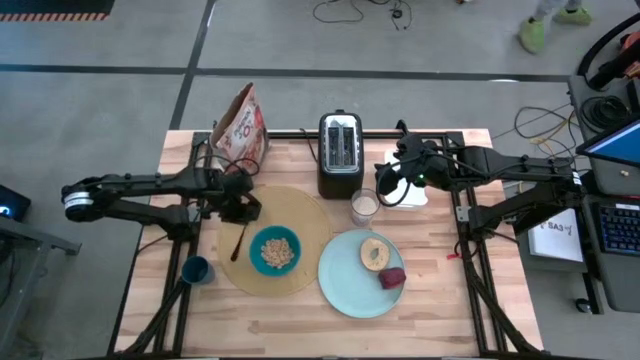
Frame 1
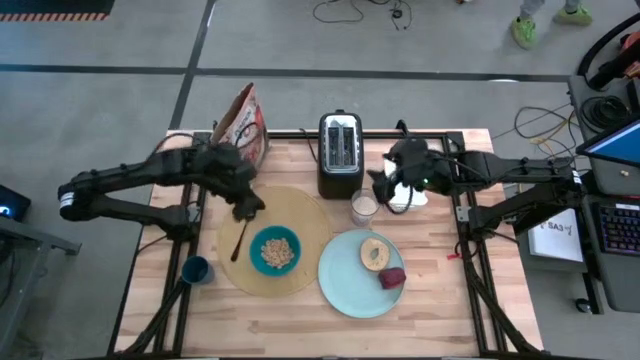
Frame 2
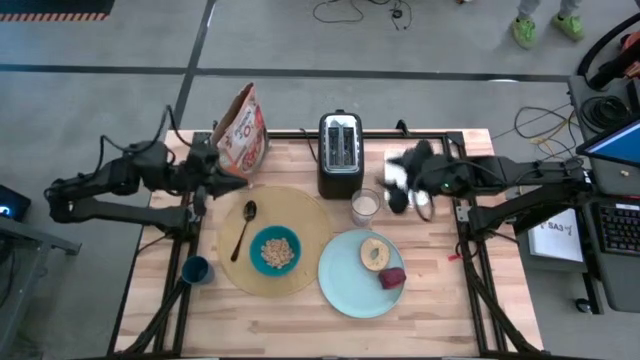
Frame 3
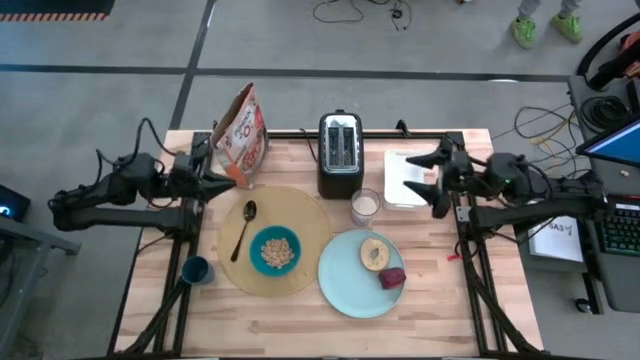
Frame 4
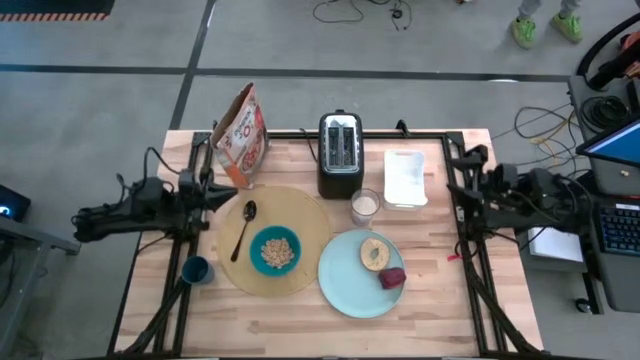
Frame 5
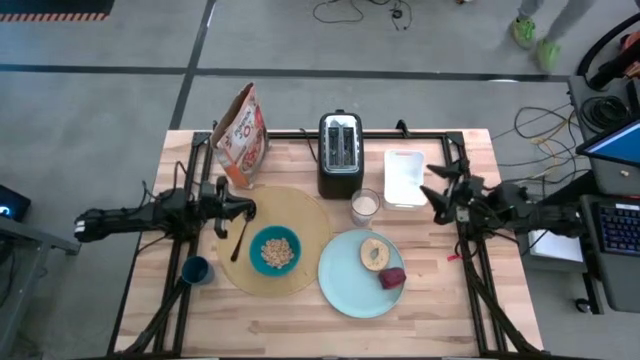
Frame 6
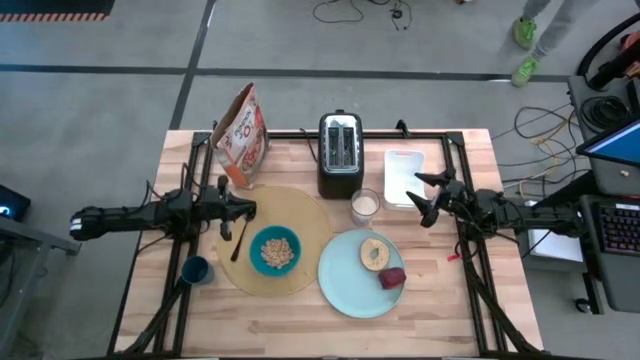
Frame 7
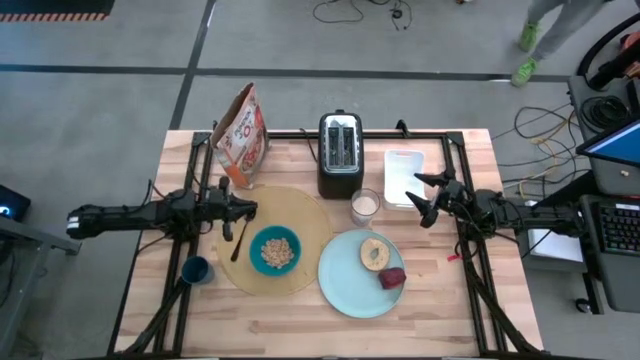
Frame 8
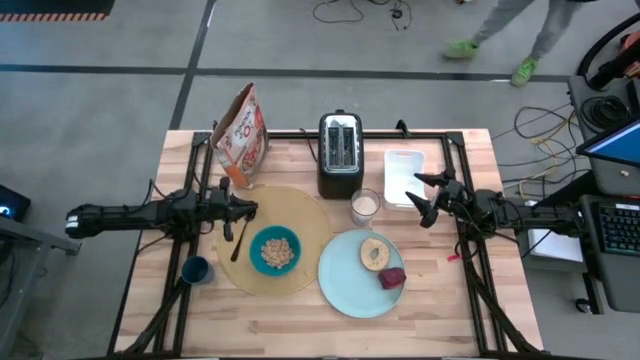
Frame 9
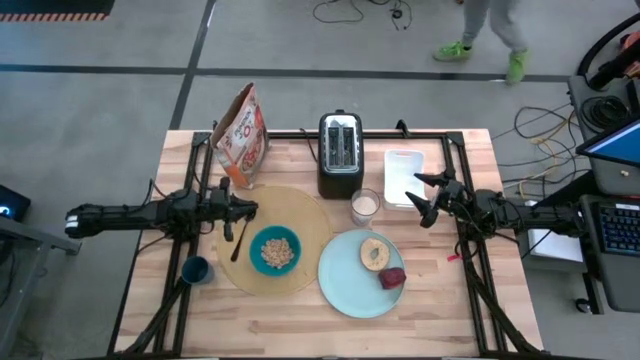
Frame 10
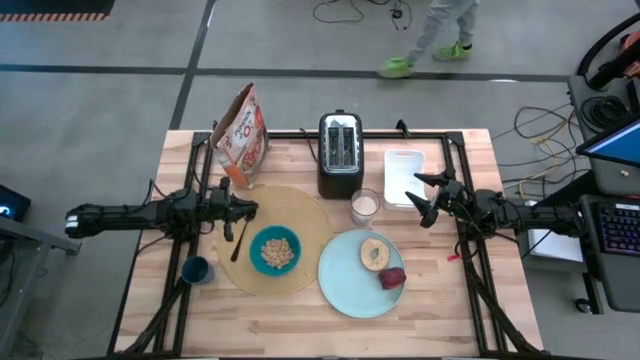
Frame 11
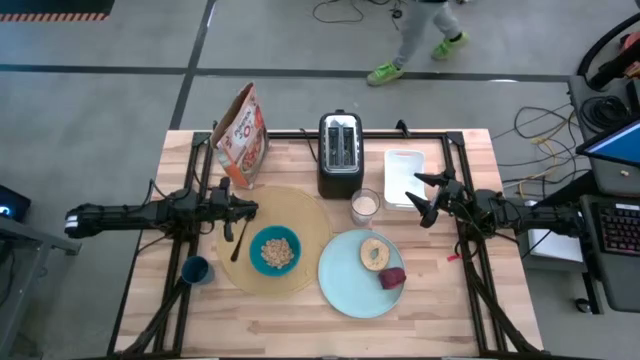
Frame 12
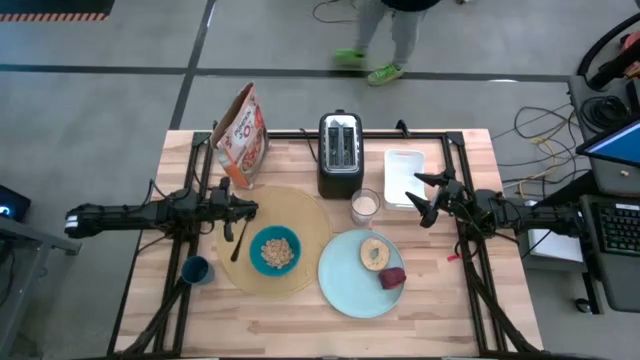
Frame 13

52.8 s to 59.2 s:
Task: Arrange a breakfast setting
Return to Home Position

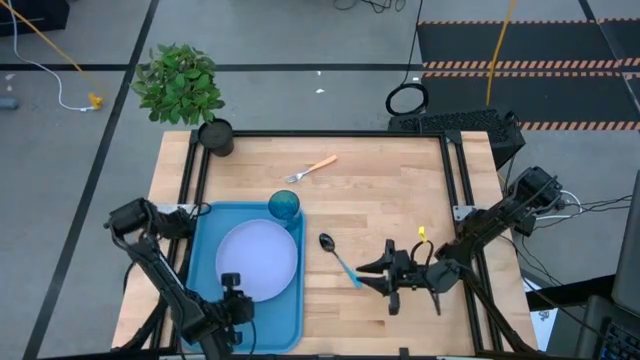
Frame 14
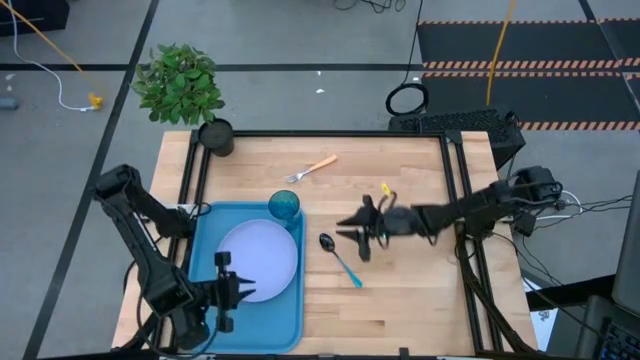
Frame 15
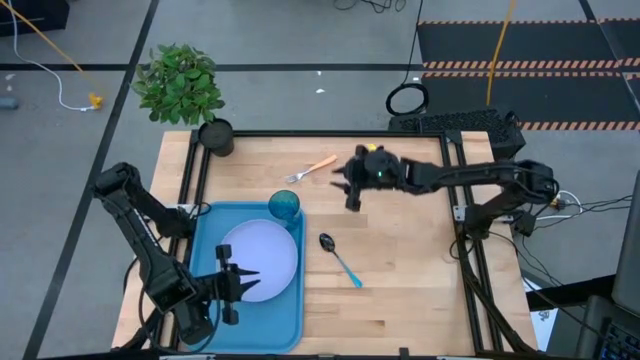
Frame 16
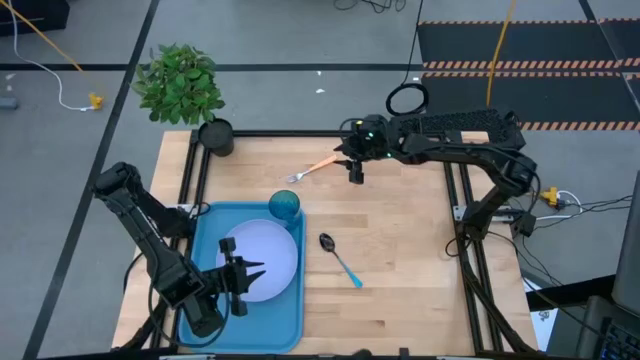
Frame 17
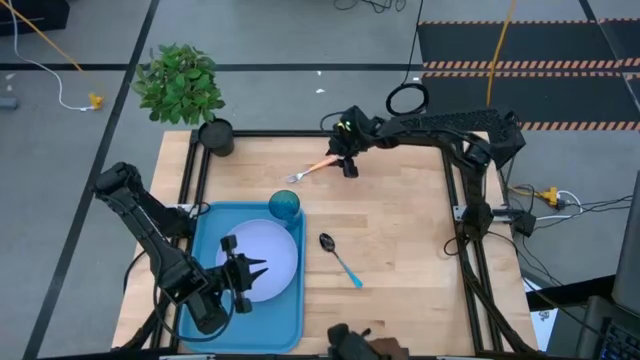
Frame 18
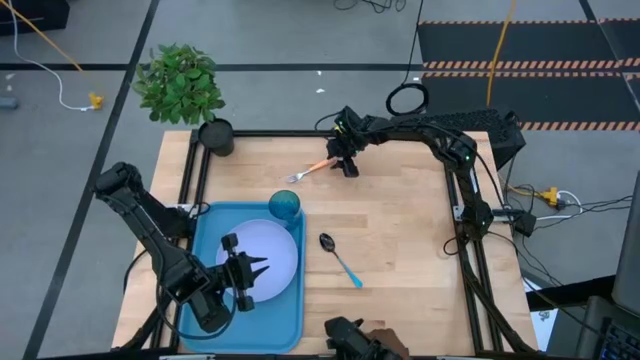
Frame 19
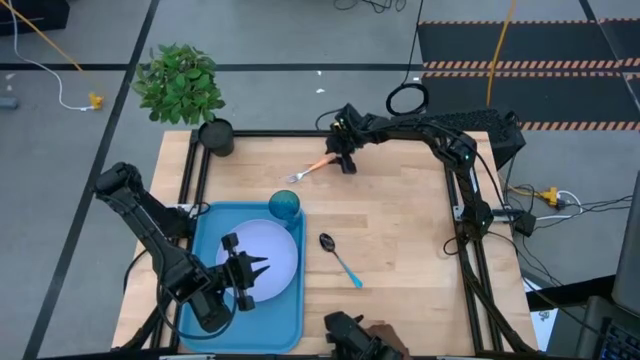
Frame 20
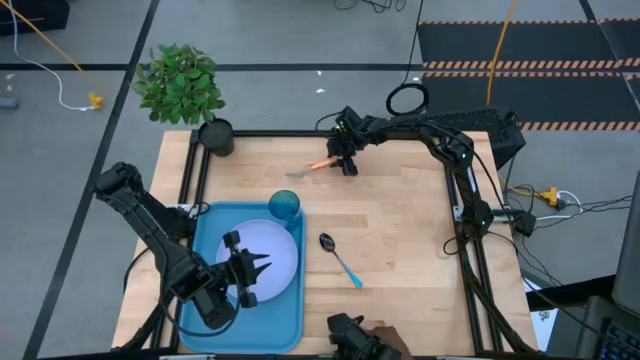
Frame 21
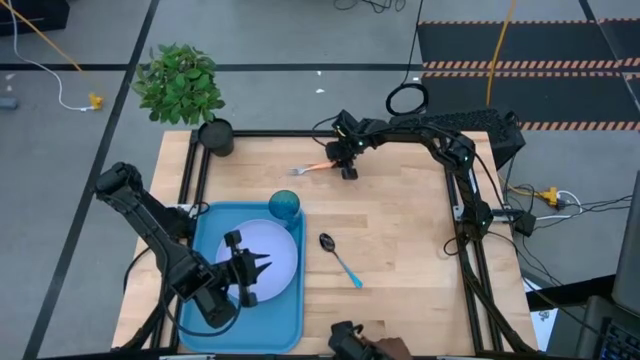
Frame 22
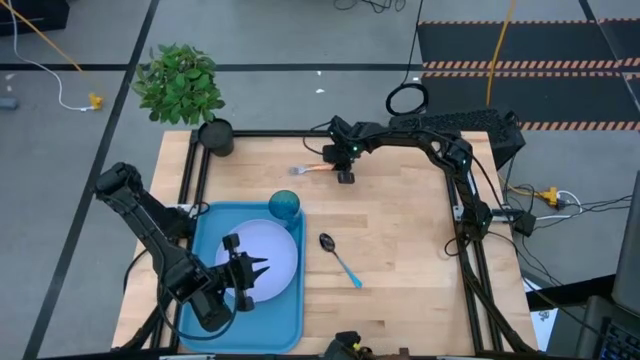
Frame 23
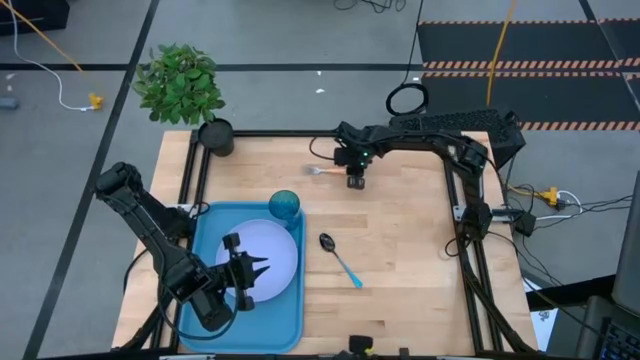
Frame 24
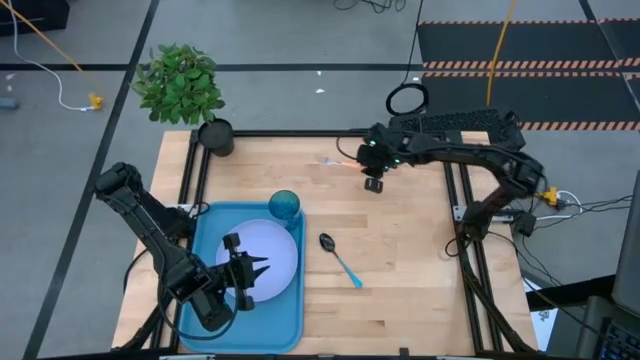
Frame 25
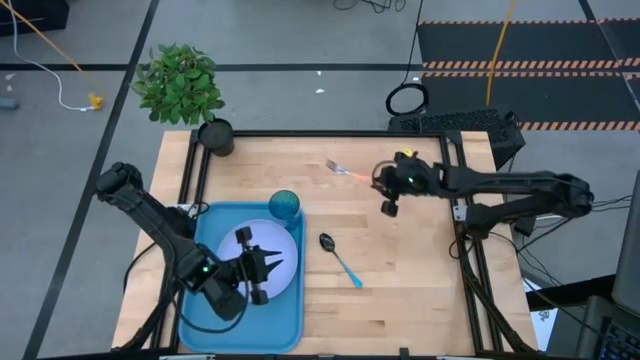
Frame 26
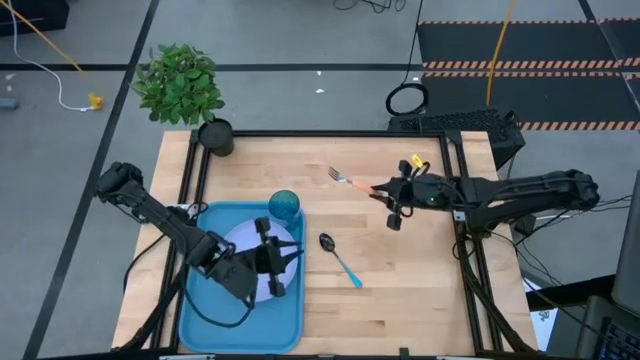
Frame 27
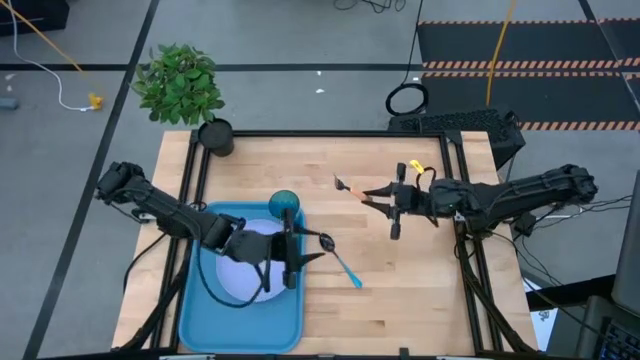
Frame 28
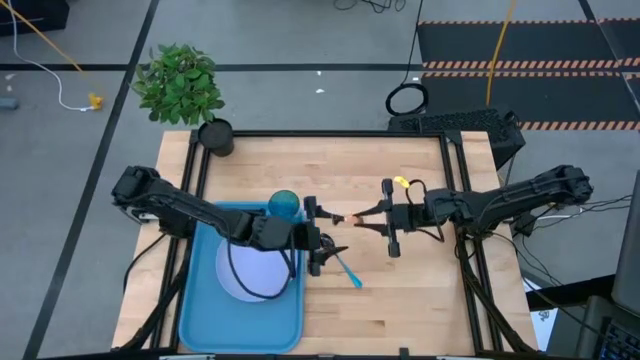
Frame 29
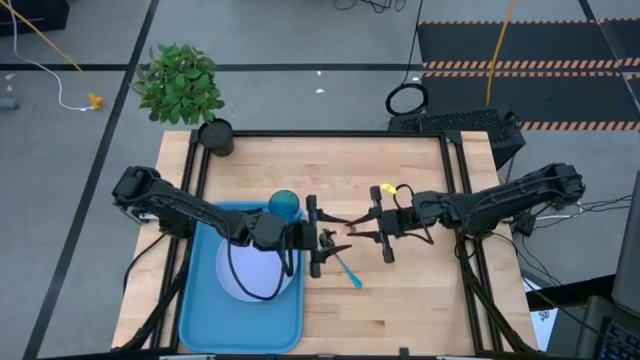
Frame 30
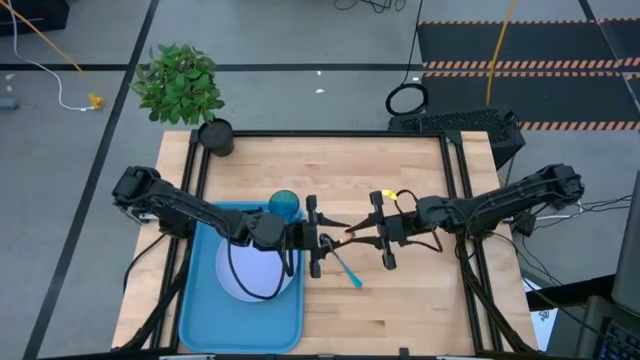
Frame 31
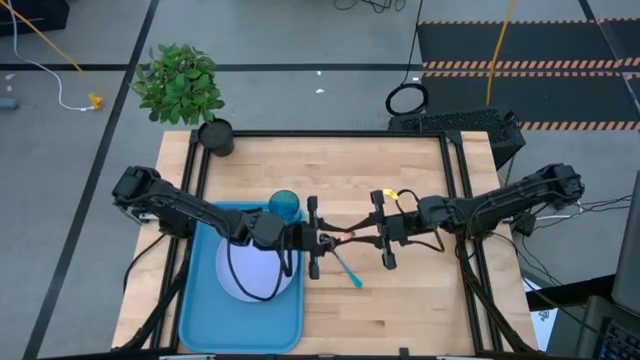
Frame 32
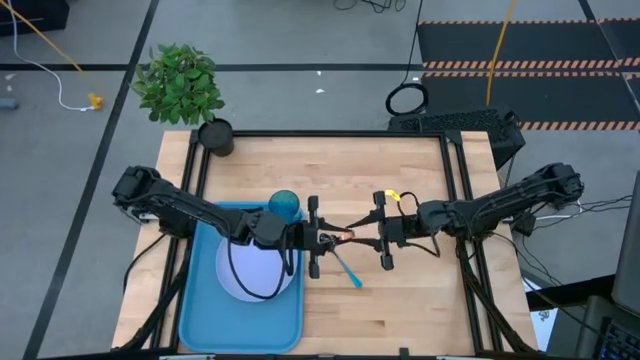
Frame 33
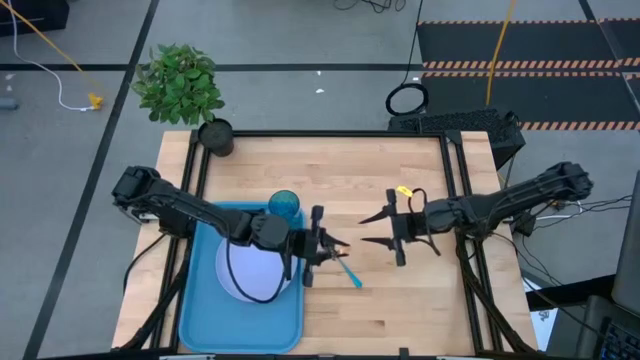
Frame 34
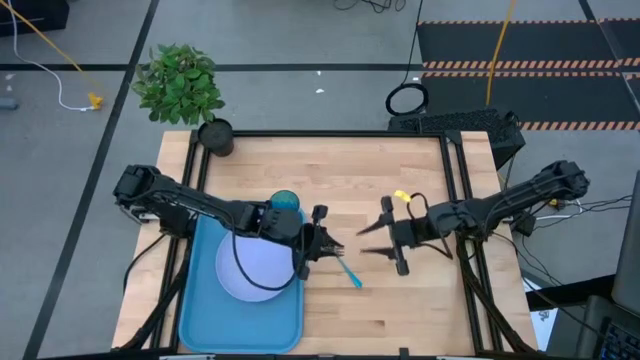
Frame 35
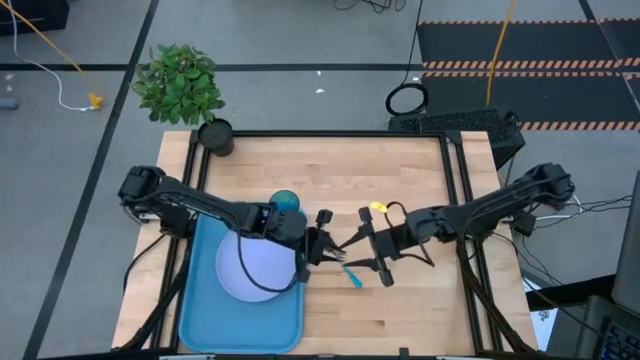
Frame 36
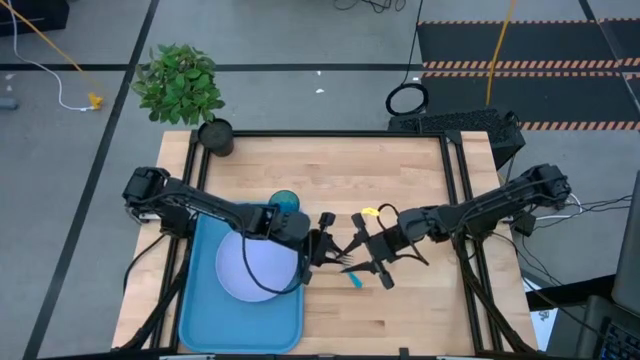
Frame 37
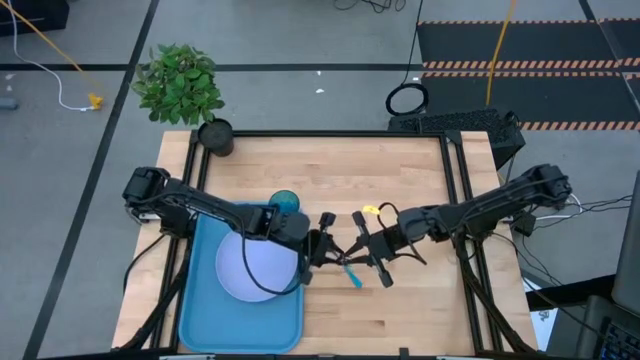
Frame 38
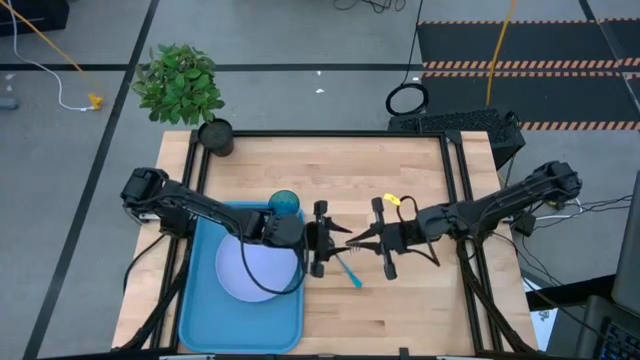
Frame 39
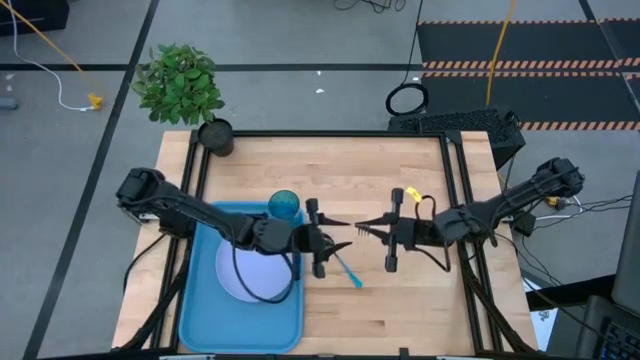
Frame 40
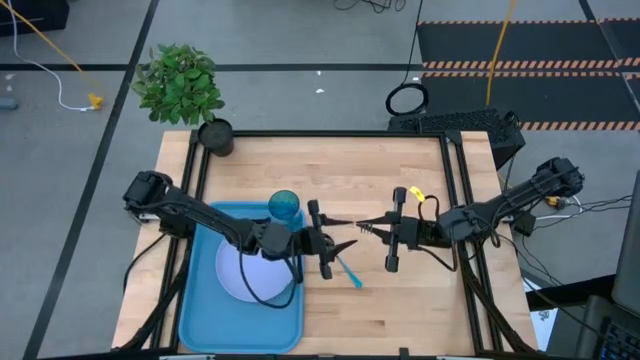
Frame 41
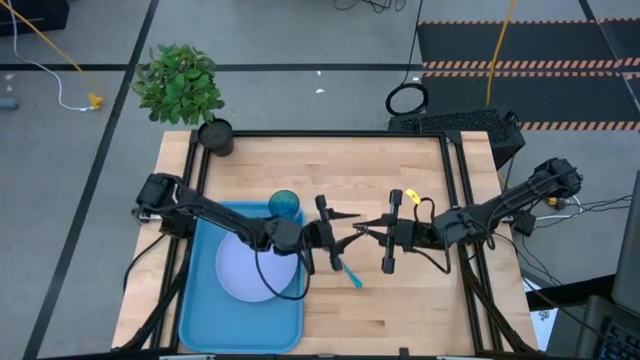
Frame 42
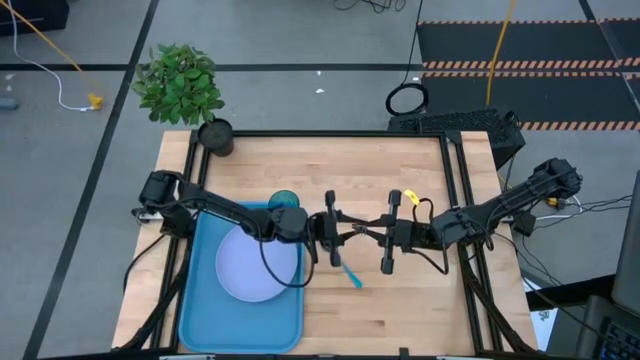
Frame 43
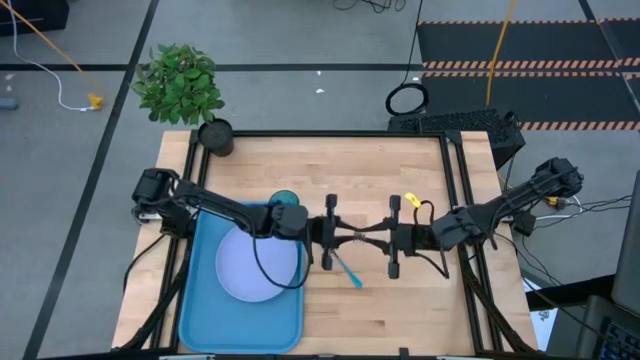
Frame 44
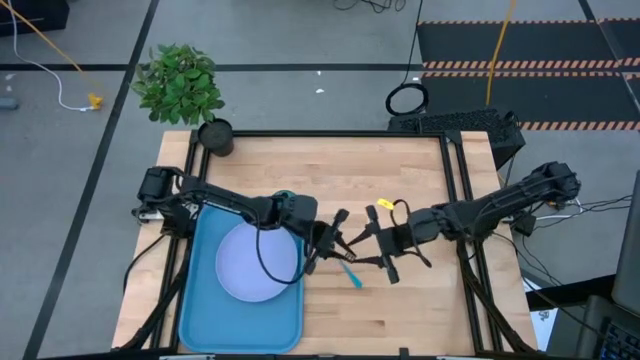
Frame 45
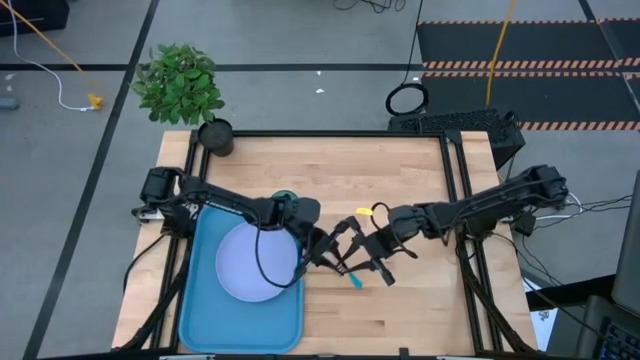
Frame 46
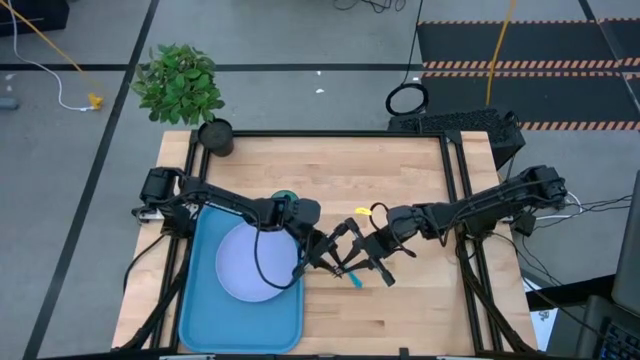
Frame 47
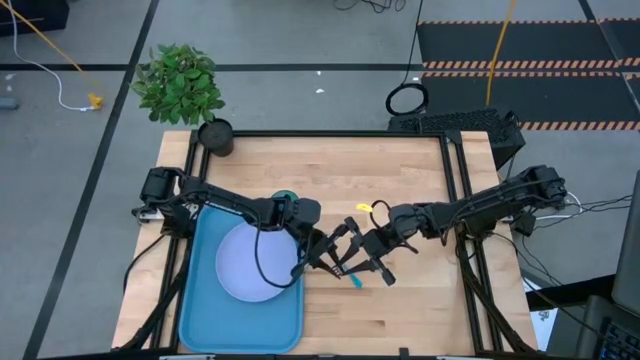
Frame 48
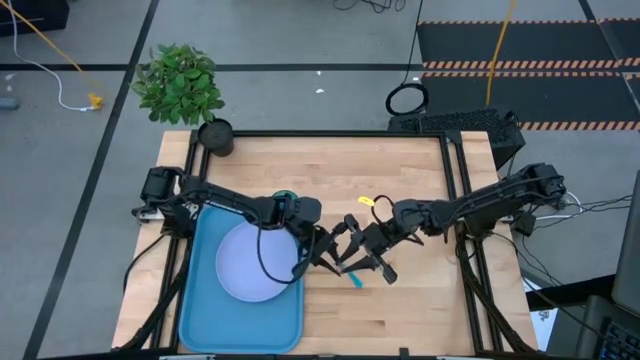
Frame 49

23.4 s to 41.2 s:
Task: Pick and place plate/cup/fork/spoon on tray
Put the yellow fork to the right of the purple plate on the blue tray
